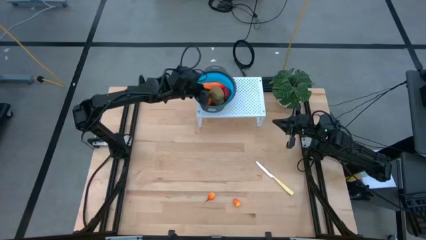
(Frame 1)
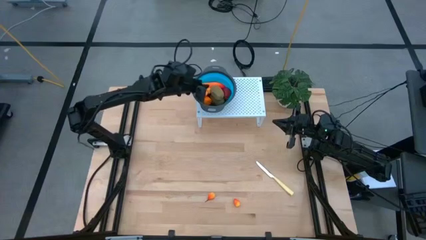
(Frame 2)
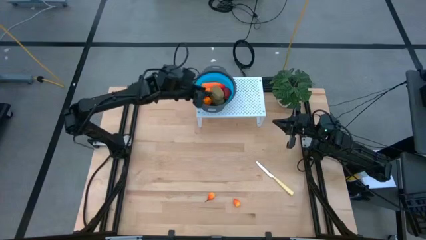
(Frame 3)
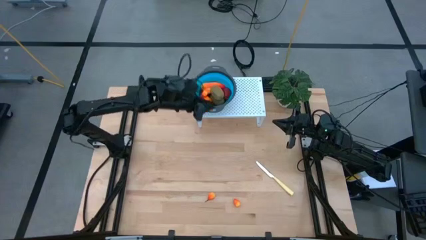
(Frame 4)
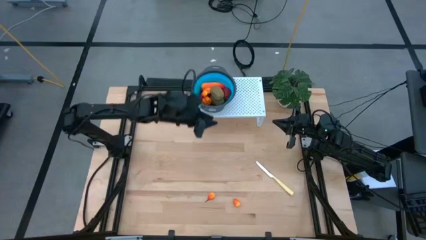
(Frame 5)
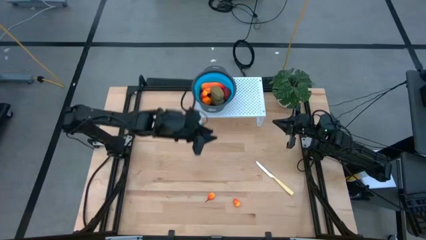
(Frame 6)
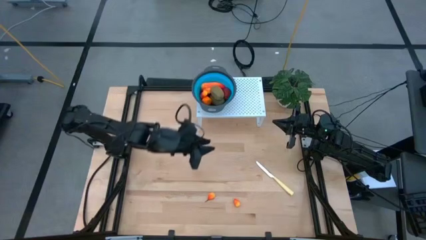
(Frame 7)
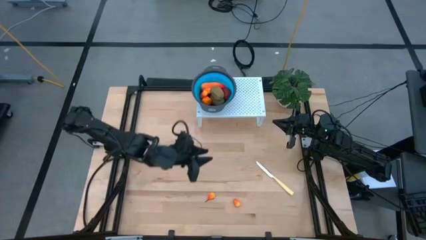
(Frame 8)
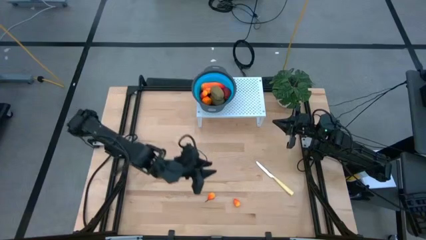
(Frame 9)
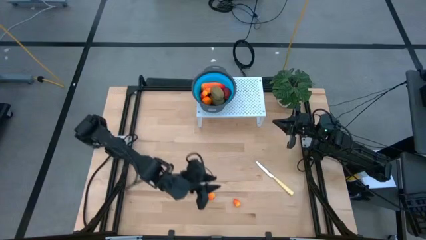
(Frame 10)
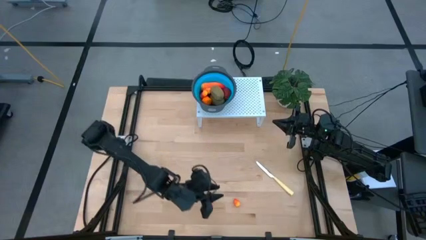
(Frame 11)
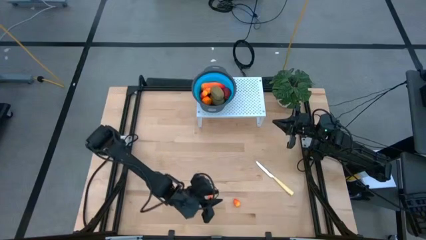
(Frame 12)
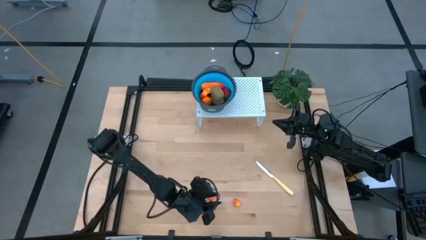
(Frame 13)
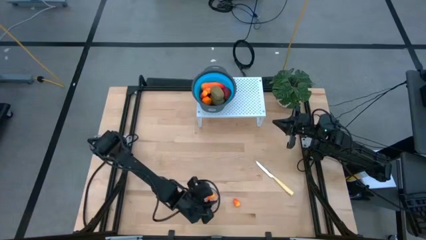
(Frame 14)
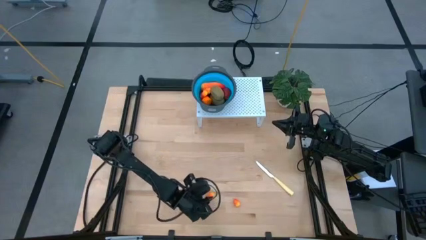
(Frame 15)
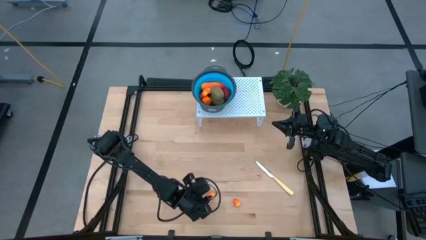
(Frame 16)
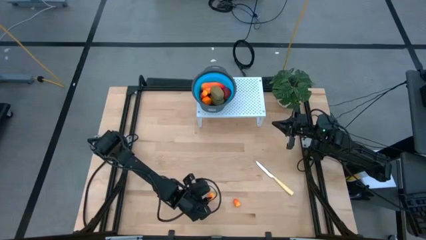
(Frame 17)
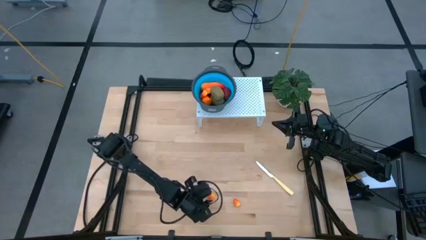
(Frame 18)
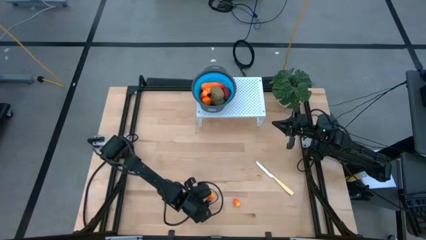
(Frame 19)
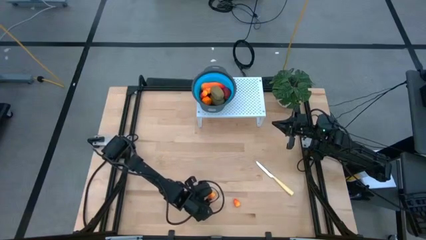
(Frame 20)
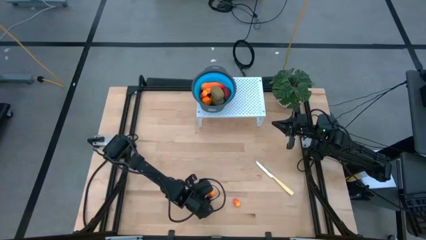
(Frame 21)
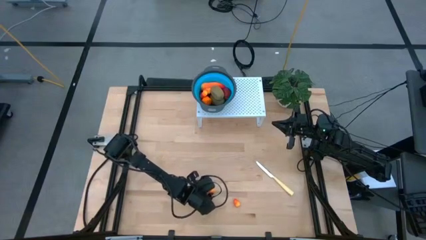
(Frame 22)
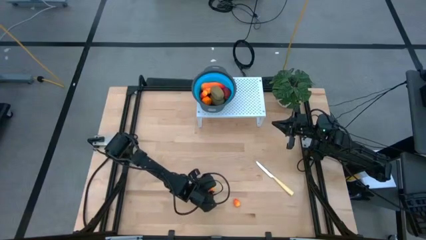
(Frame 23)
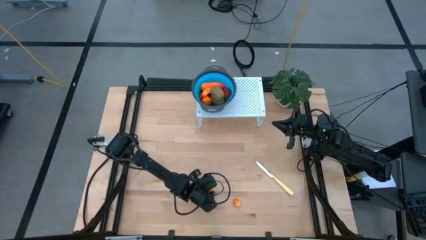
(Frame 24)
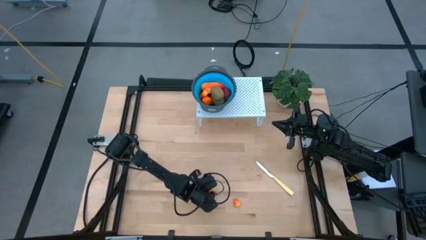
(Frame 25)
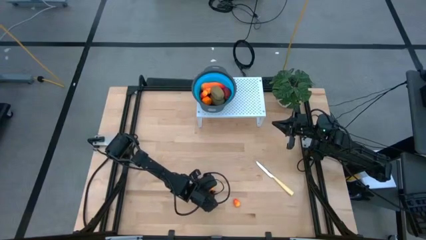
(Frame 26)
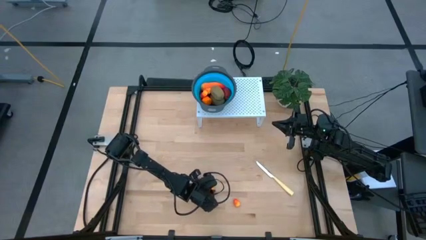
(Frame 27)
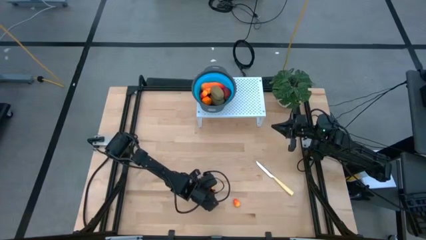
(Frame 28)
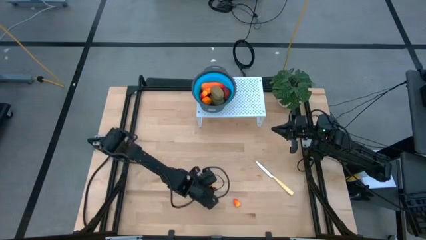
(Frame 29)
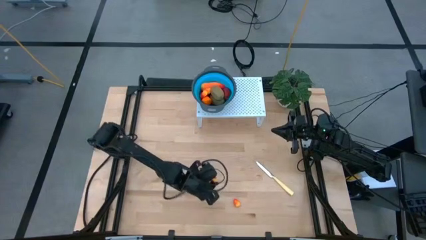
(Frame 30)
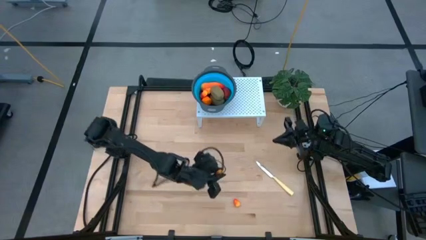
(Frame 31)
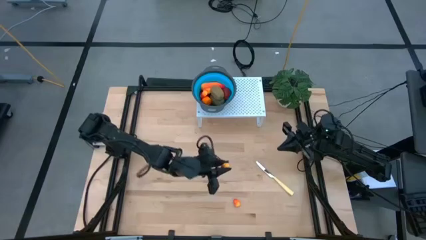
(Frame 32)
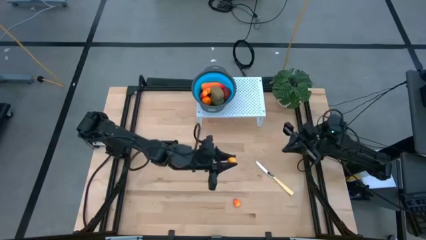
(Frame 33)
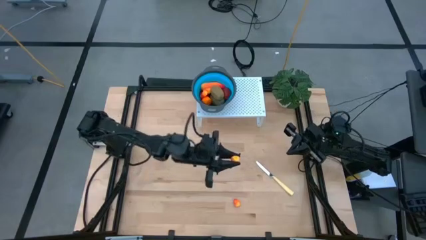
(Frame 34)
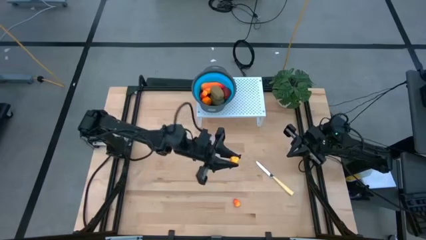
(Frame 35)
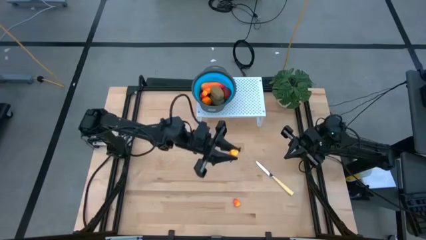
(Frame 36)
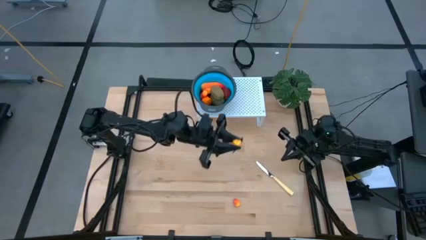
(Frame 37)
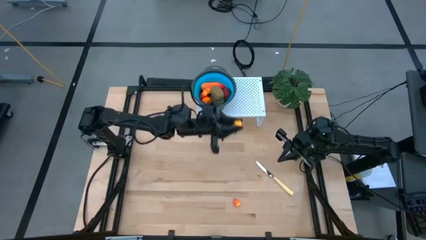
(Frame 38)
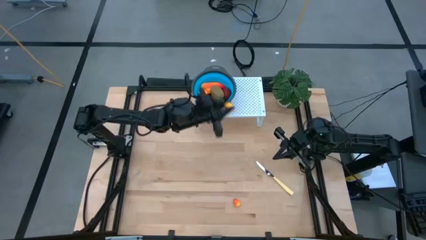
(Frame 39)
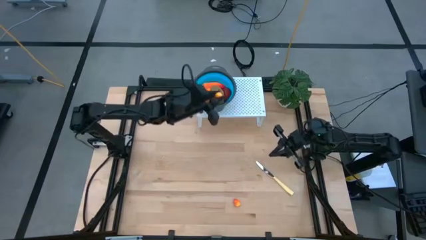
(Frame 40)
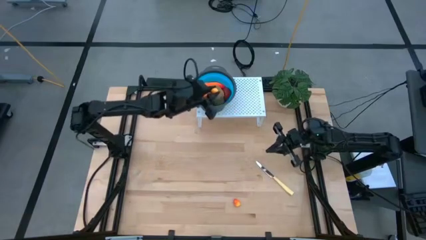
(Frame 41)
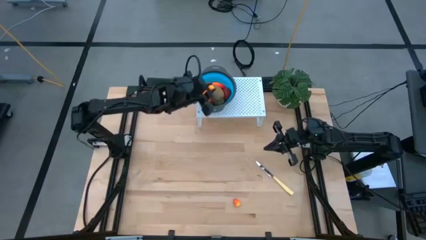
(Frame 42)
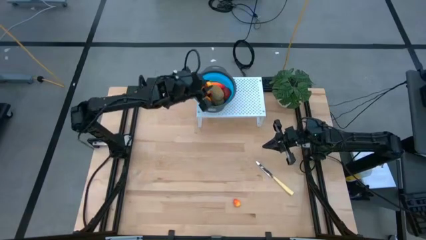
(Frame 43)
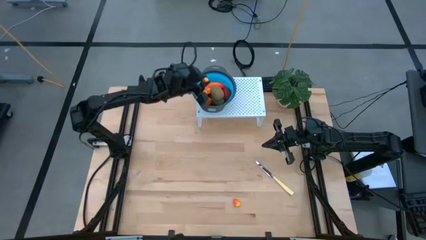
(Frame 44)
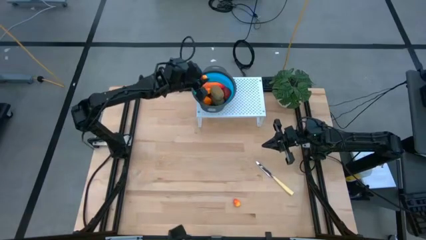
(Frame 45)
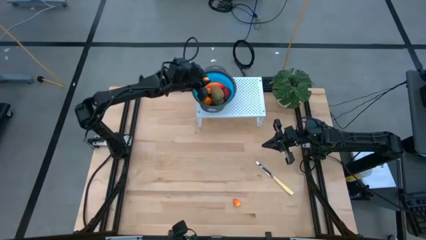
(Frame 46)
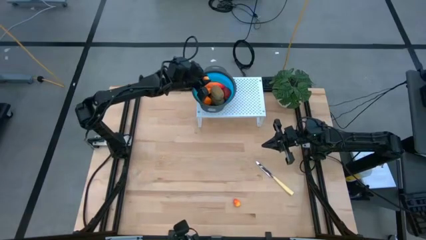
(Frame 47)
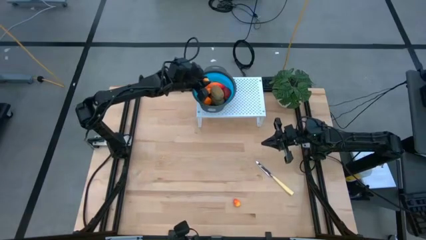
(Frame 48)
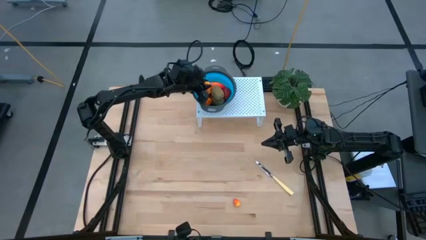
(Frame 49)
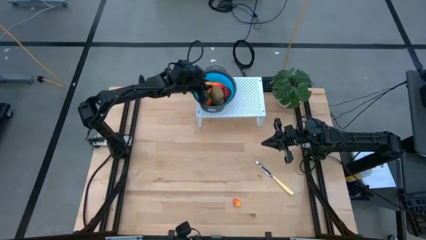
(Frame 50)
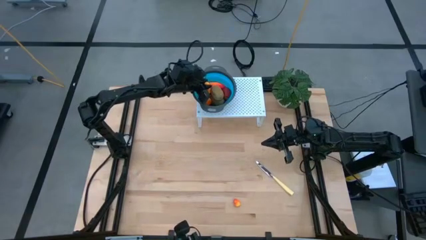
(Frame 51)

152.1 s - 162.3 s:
Task: Pick & Place Fruit
Put the peach into the blue strainer bowl on the shelf

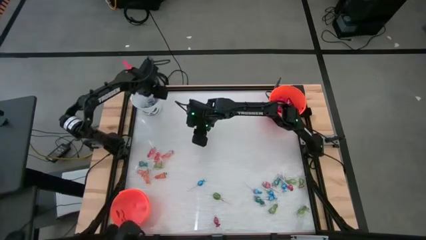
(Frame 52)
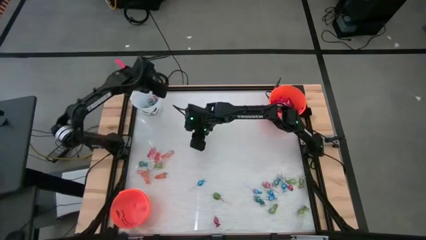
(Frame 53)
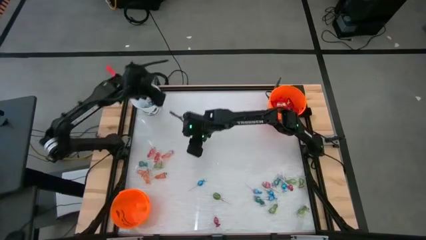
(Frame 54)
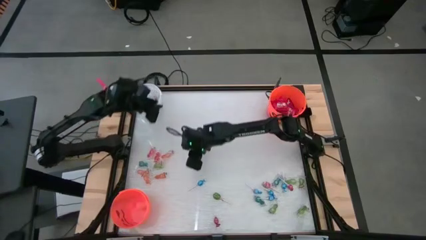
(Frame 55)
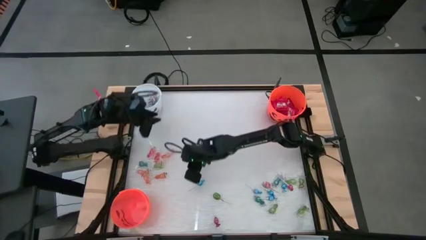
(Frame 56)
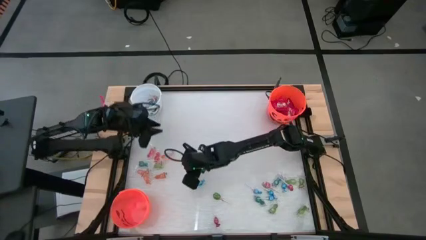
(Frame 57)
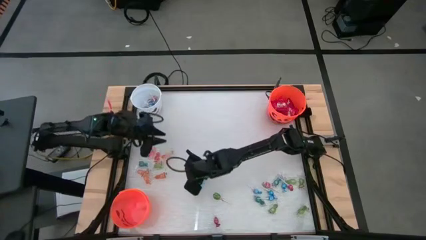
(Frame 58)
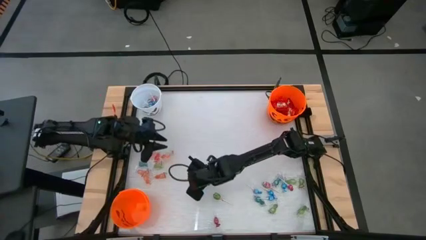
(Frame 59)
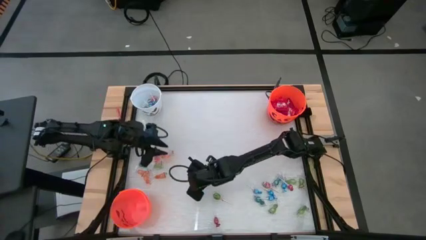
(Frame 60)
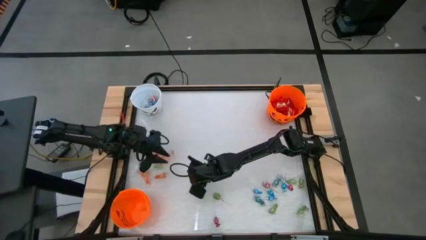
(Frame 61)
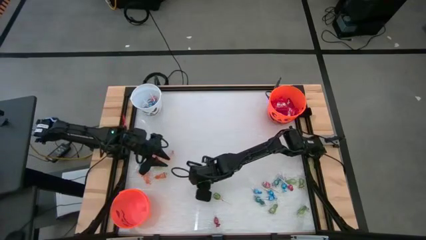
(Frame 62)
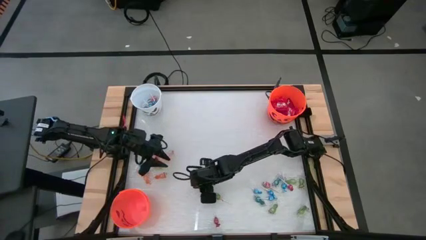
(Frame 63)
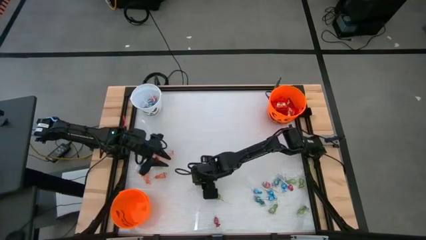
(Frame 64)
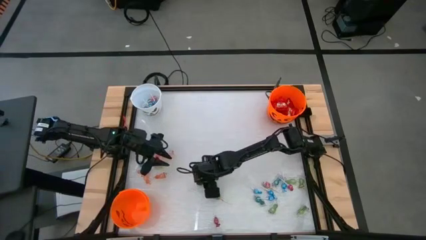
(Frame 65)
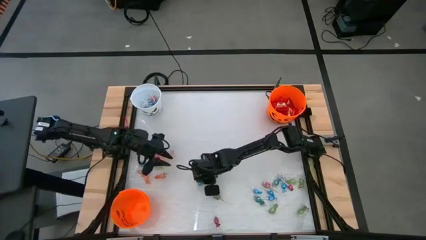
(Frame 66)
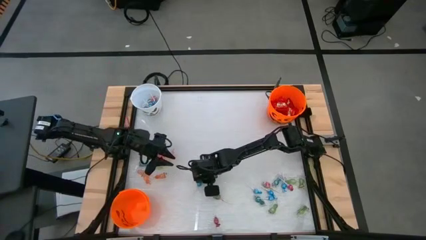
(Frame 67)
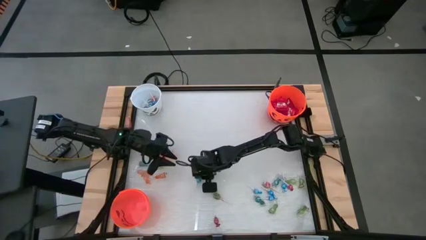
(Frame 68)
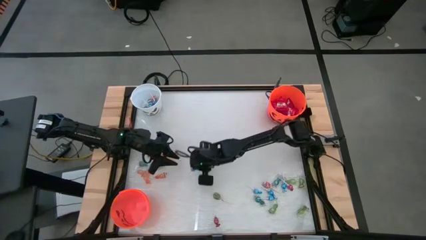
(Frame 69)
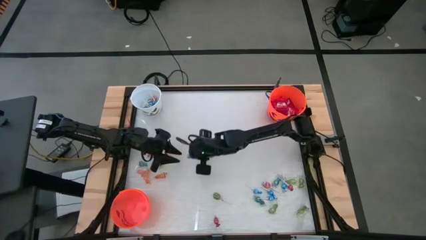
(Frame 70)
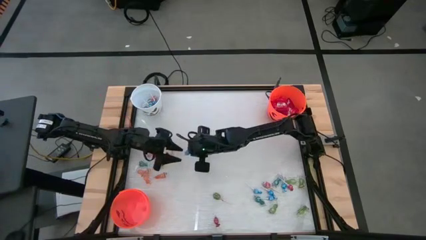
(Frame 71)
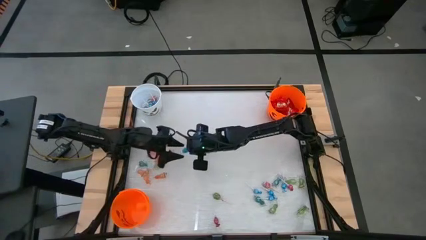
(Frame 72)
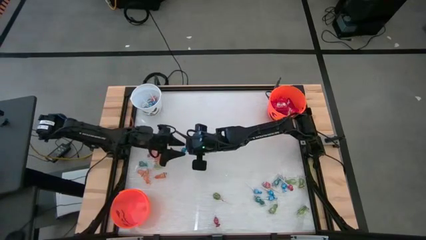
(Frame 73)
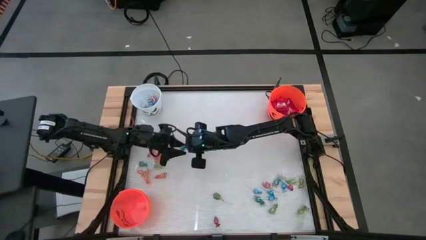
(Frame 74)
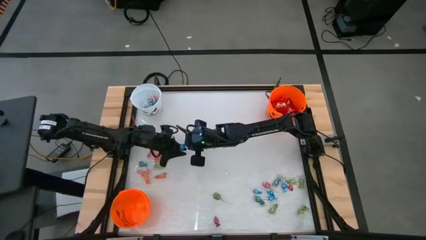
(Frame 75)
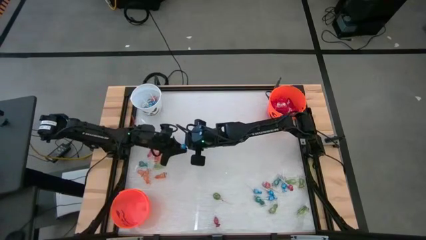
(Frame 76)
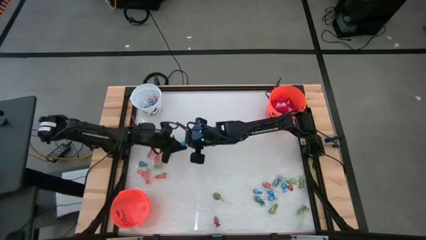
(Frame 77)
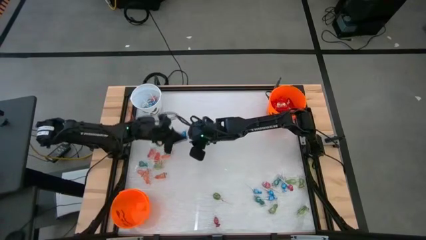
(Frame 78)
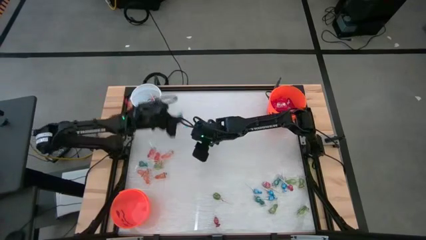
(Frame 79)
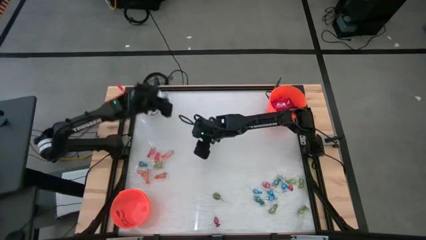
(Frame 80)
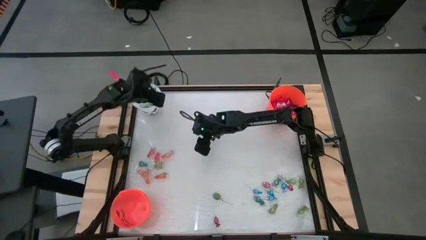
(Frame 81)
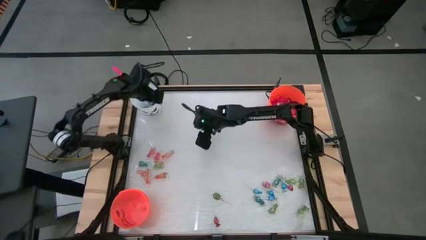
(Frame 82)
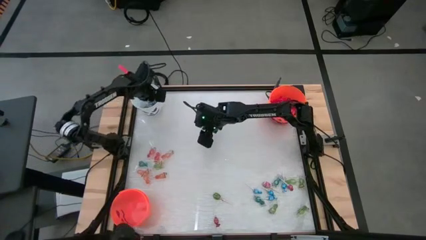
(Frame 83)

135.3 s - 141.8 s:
Task: Sort candy by brand, put in halloween buckets
Put the blue lollipop into the white bucket
